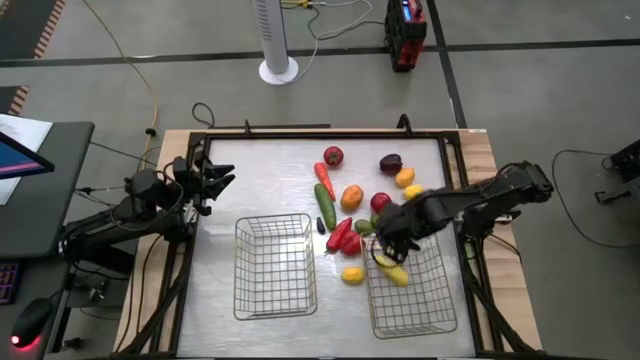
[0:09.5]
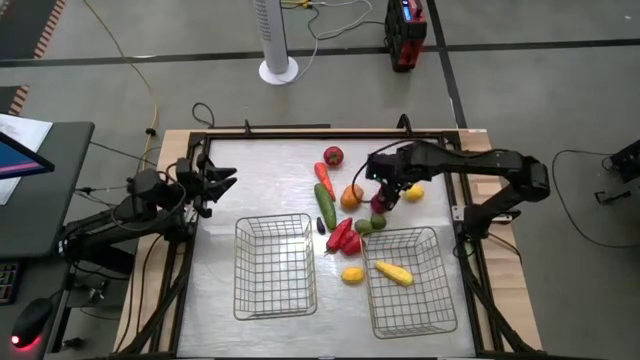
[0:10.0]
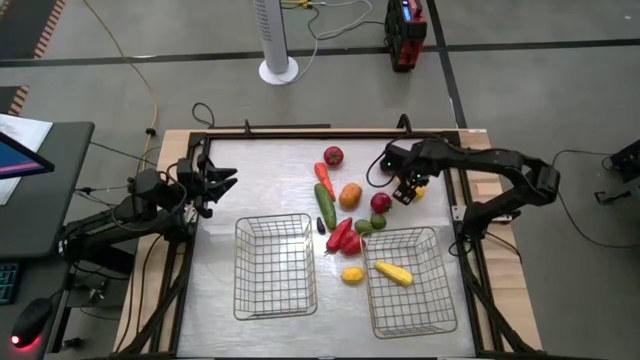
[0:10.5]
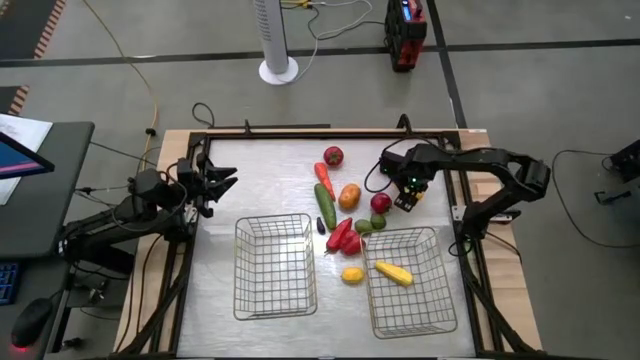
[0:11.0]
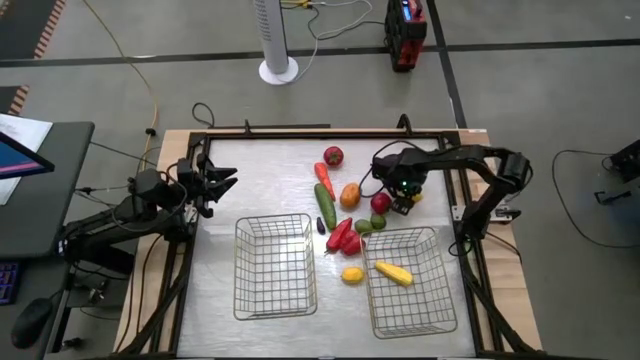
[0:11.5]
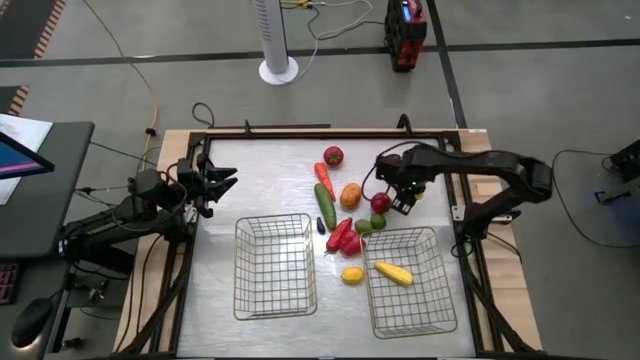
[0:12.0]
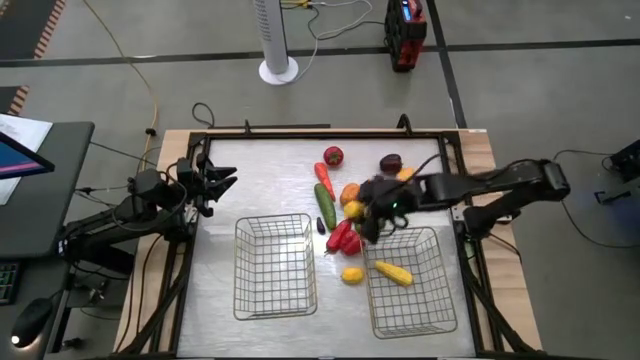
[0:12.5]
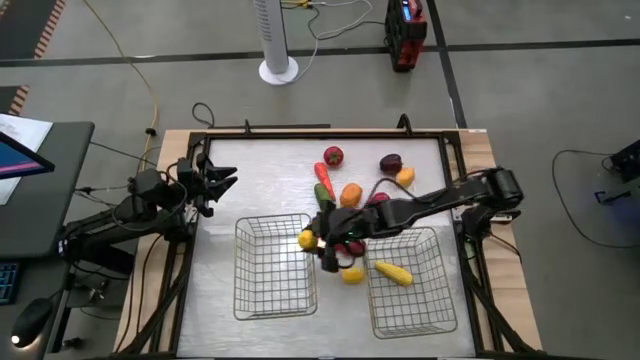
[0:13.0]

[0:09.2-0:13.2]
Task: Sort produce into baskets
Put the yellow lemon into the left wire basket

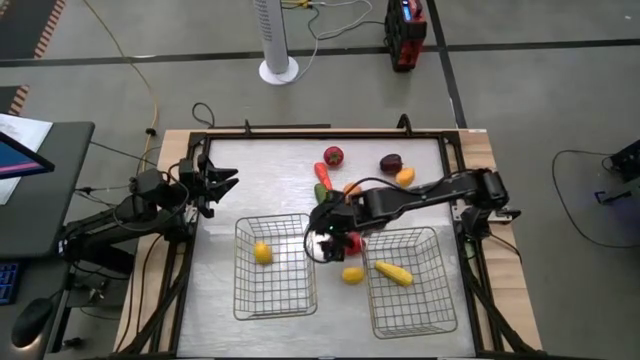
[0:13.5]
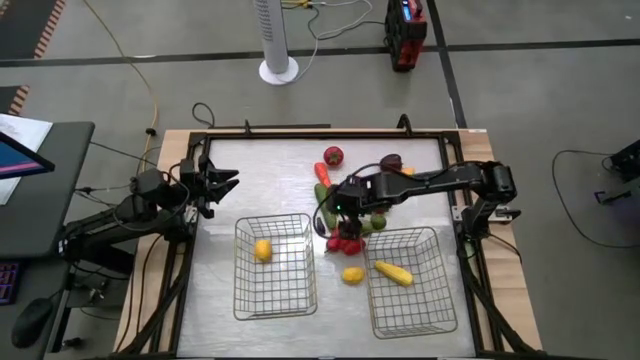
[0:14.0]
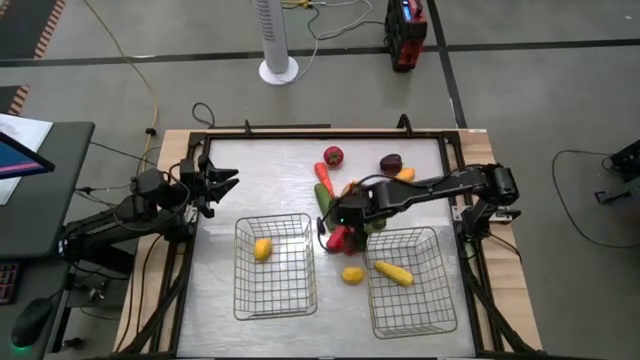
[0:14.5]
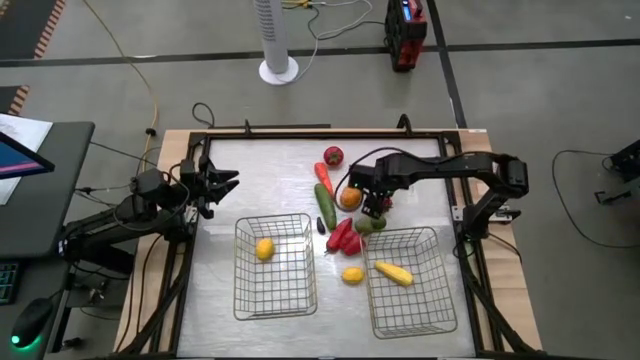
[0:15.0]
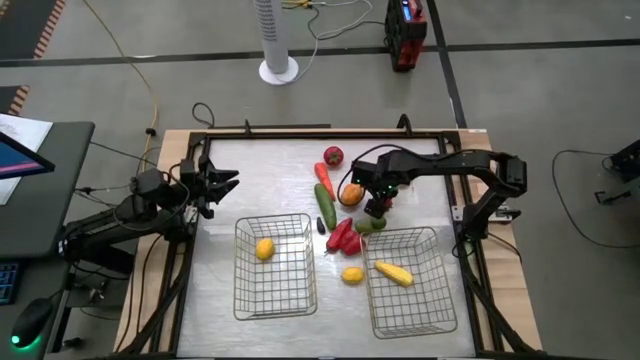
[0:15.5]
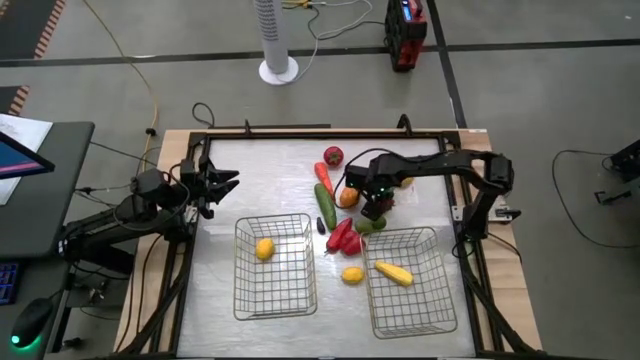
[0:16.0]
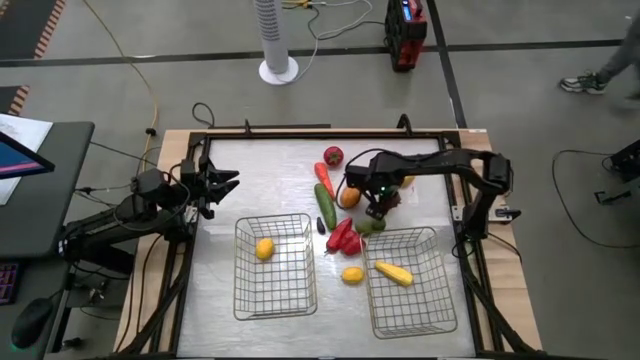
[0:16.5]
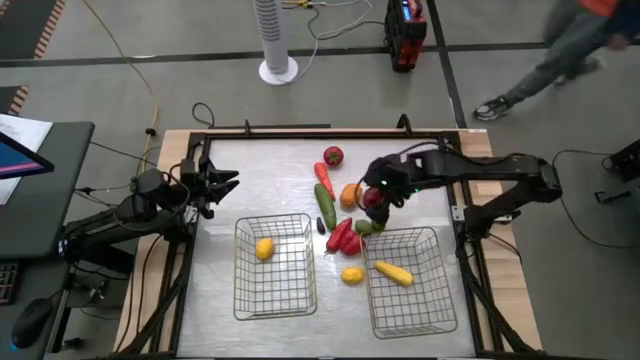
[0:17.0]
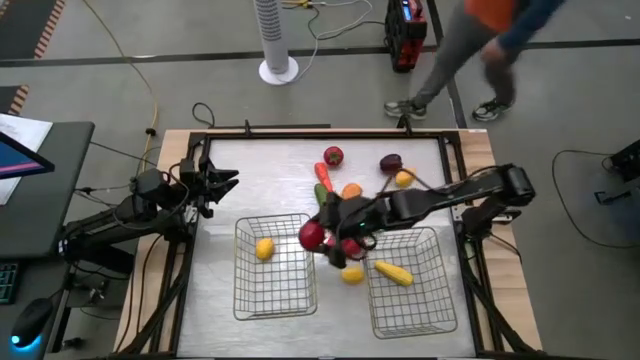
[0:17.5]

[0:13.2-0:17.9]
Put the red tomato into the left wire basket

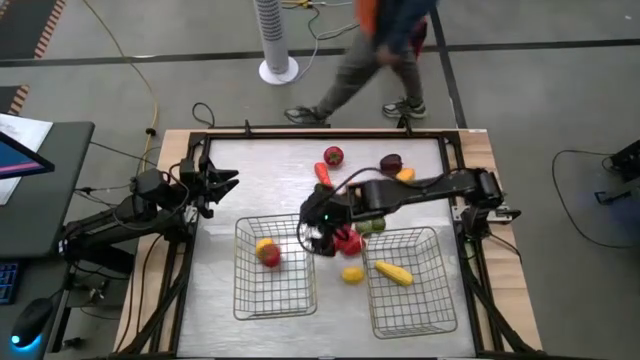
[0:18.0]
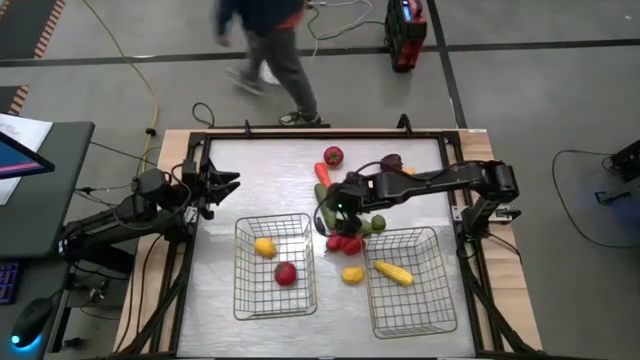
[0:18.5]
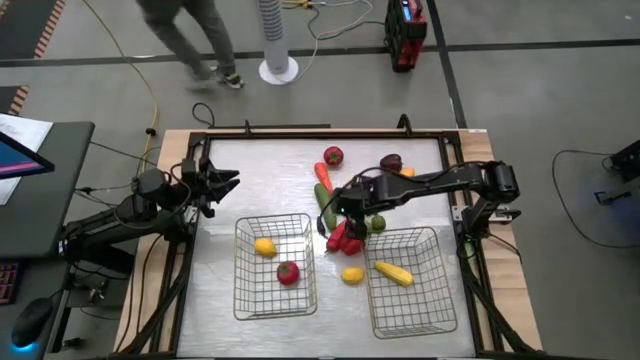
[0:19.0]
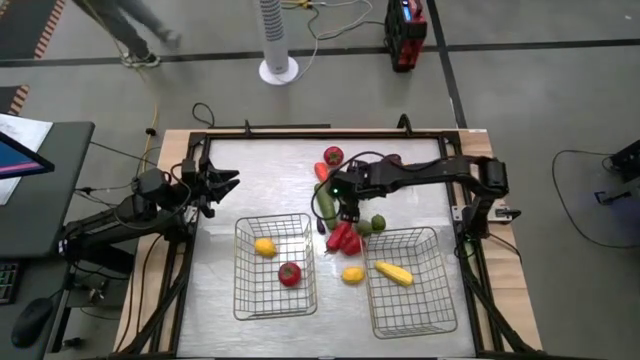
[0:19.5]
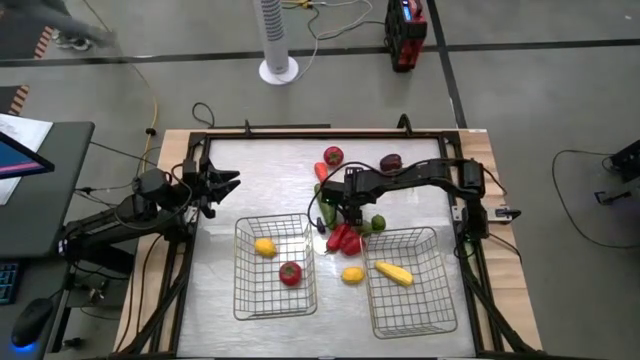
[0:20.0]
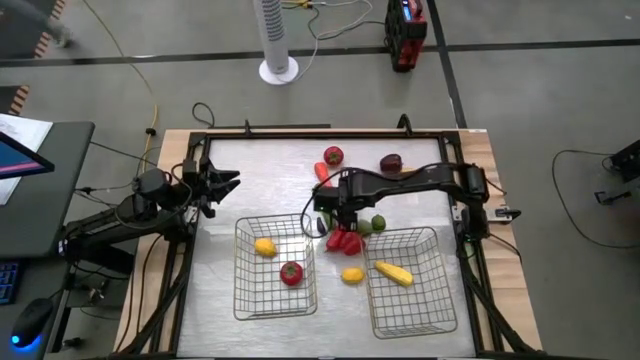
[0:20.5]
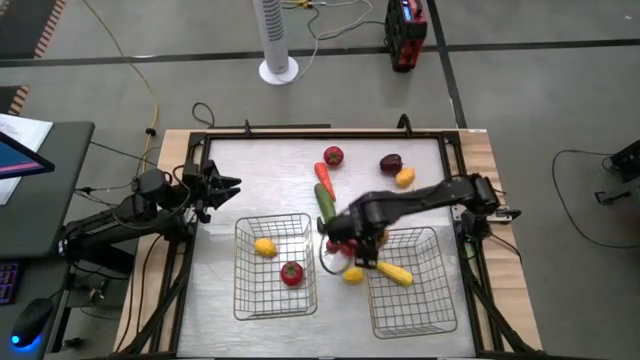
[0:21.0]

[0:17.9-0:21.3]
Put the brown potato into the right wire basket

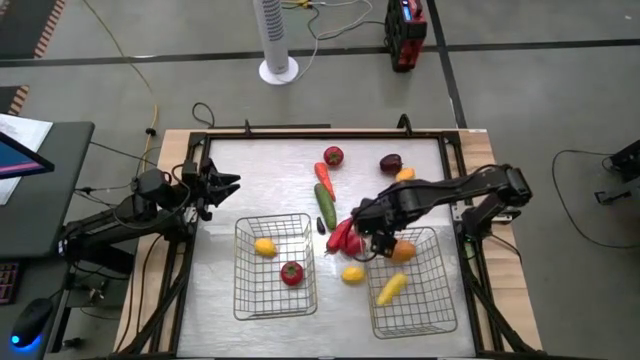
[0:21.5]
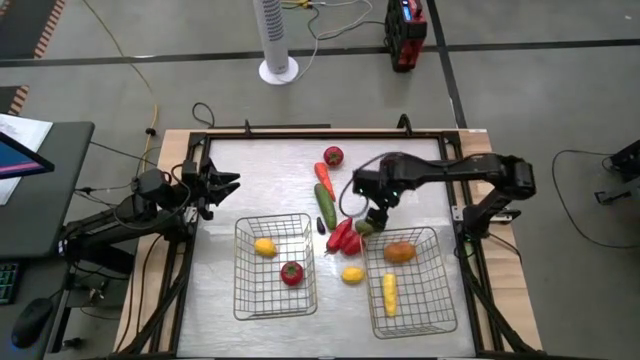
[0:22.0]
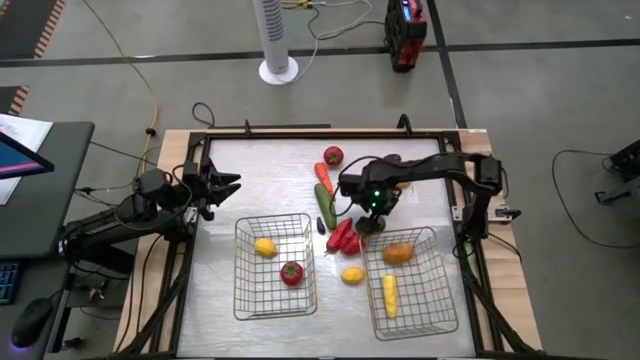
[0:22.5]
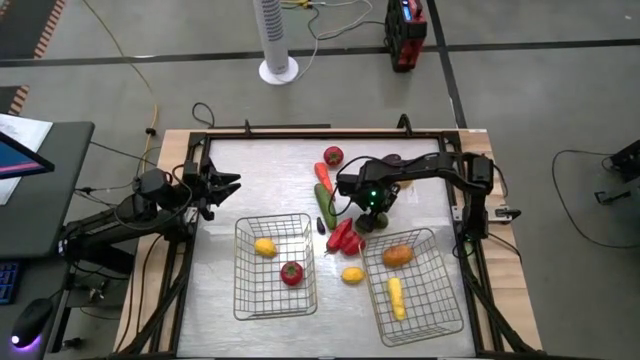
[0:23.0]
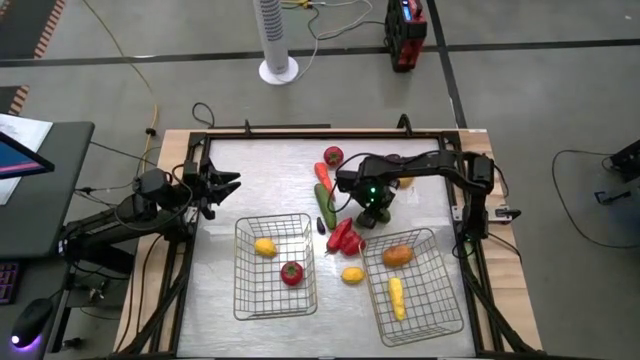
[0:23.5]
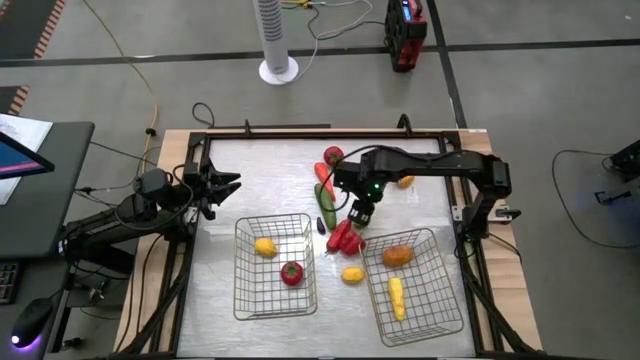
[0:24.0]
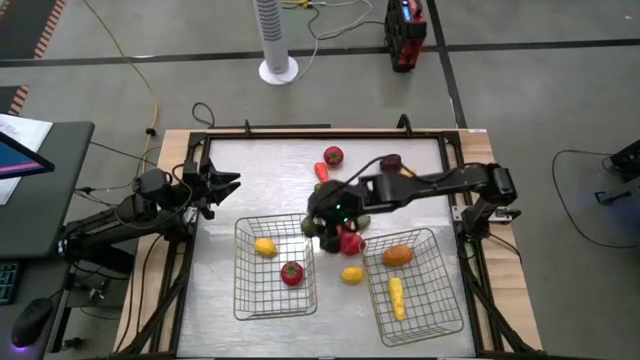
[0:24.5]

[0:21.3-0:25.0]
Put the green lime into the left wire basket

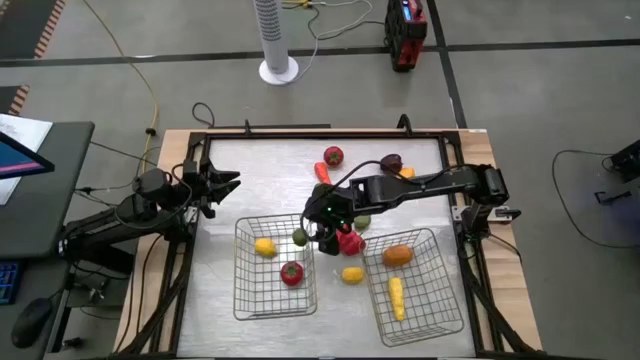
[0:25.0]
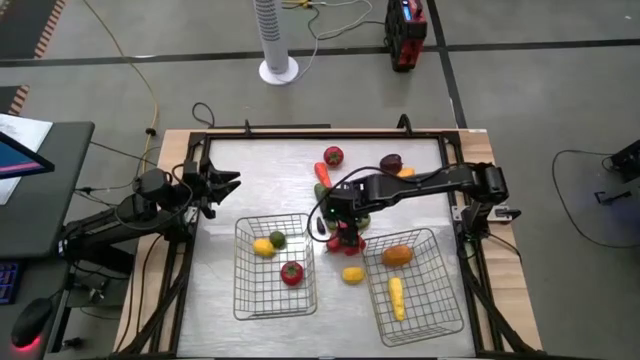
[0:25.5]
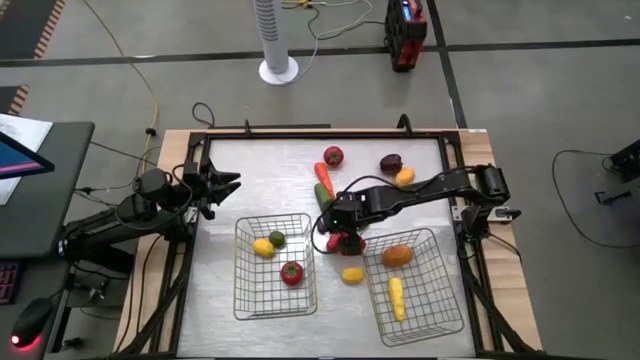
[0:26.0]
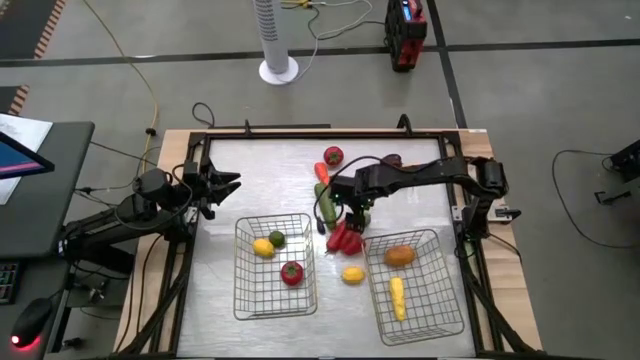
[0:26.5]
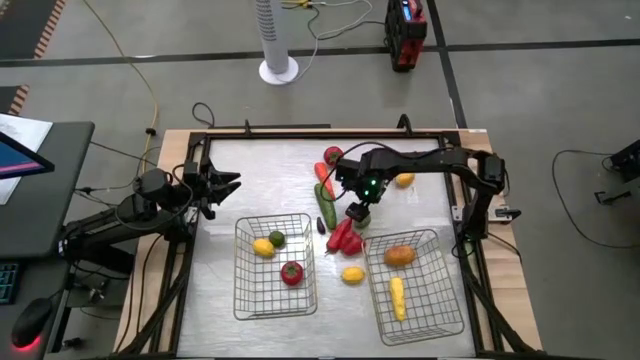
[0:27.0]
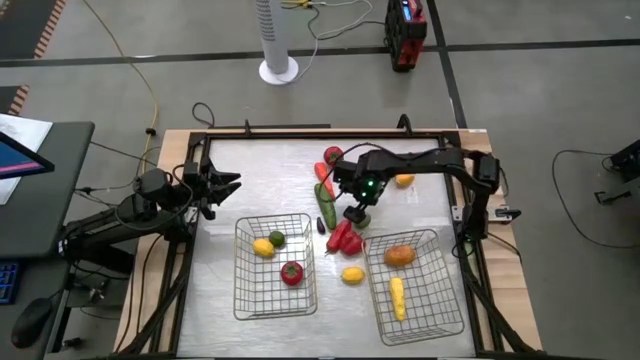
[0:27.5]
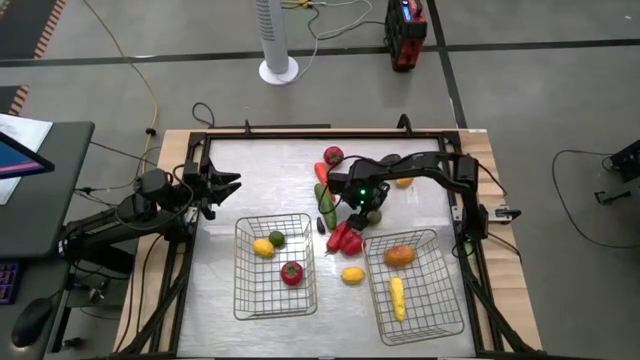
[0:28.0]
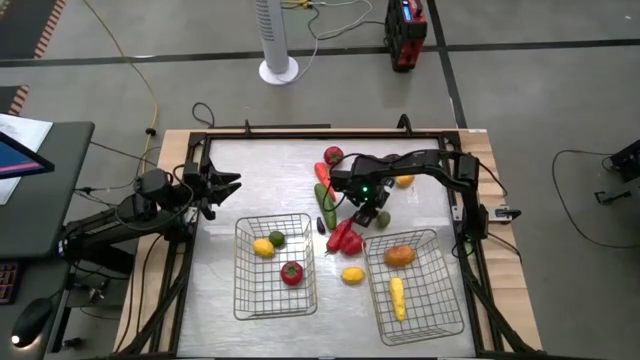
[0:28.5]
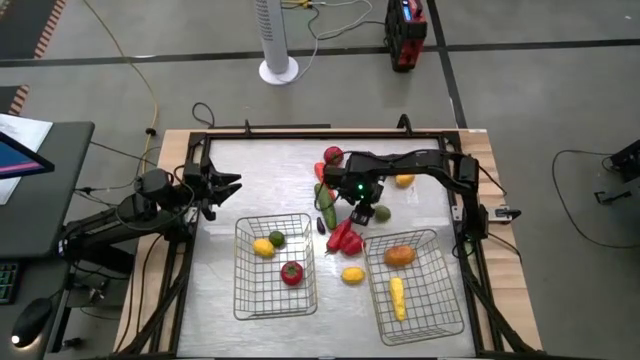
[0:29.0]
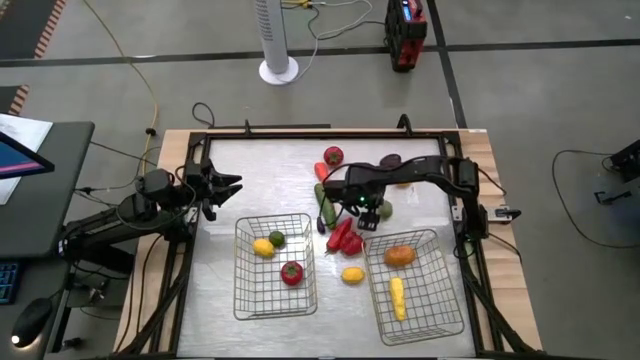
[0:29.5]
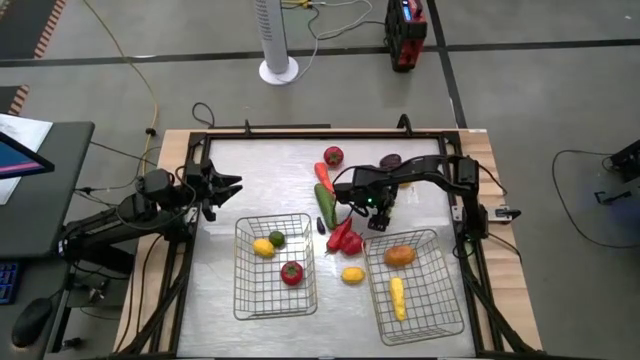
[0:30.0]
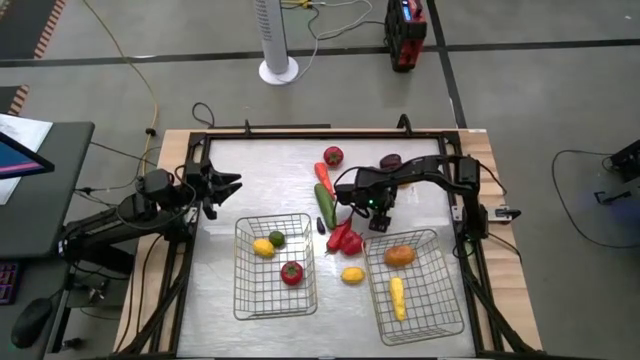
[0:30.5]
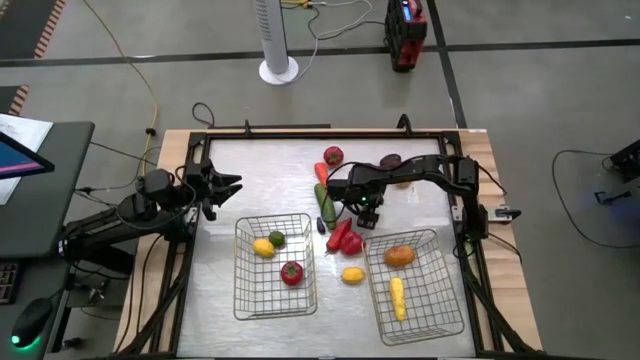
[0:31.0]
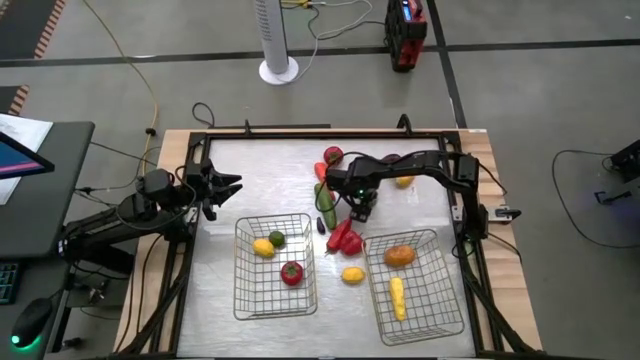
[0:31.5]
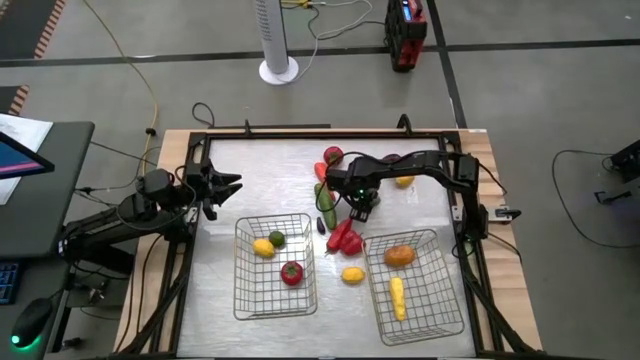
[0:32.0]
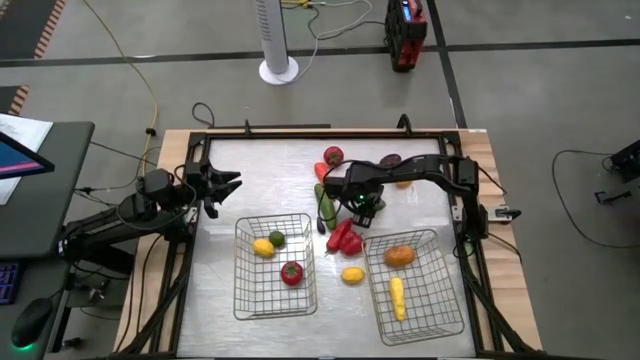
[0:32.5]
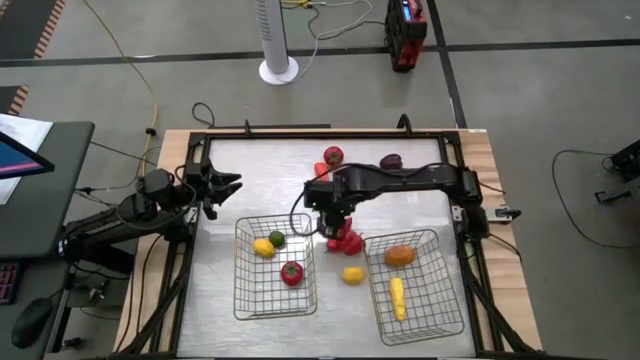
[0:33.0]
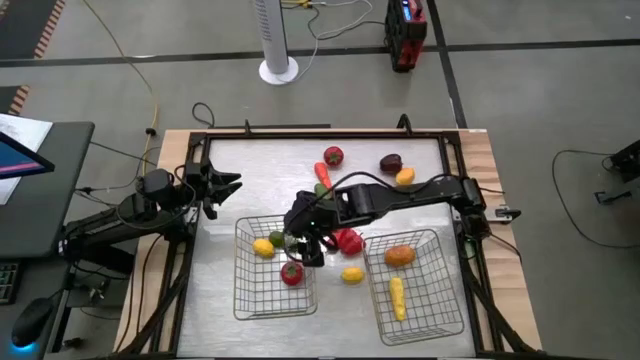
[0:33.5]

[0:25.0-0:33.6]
Put the green lime into the left wire basket
